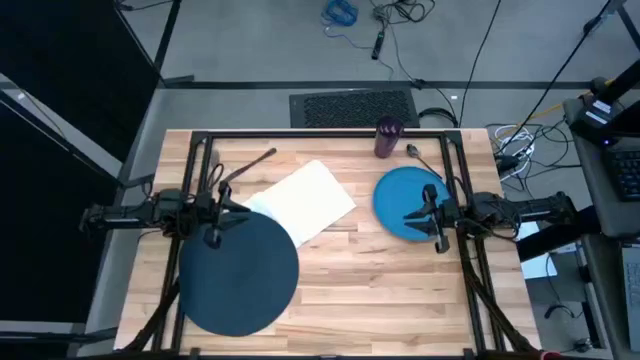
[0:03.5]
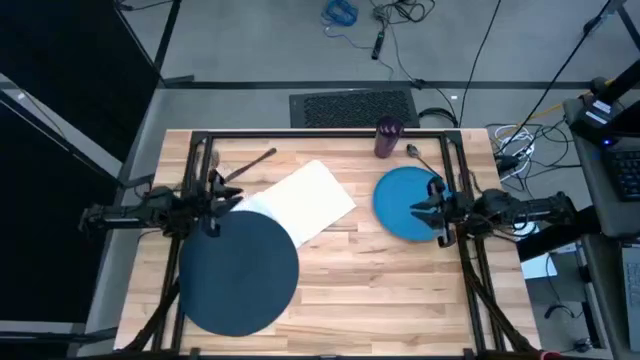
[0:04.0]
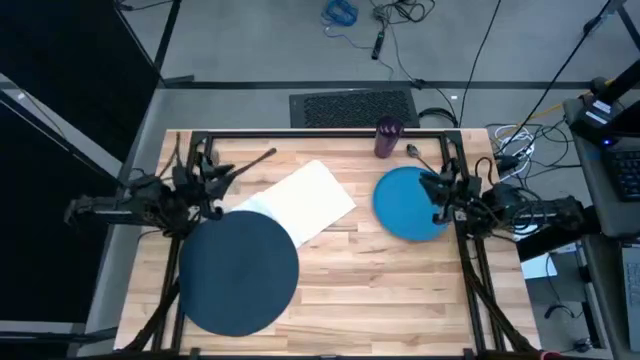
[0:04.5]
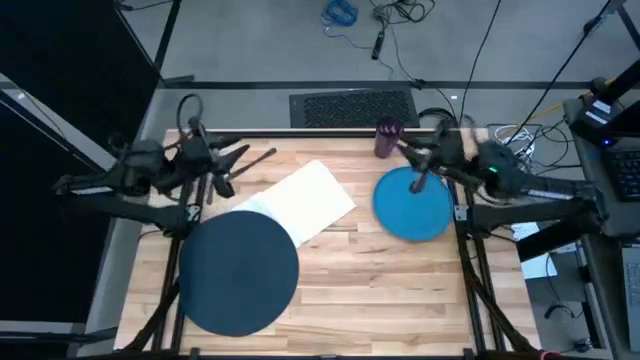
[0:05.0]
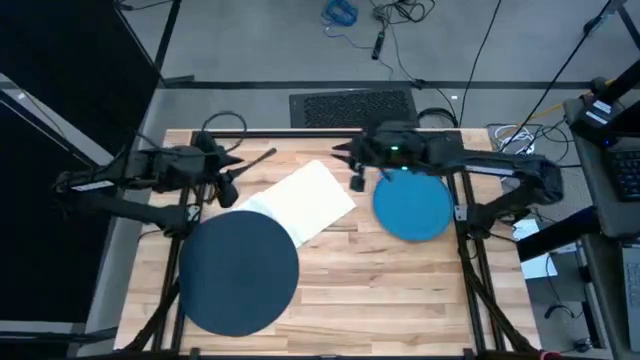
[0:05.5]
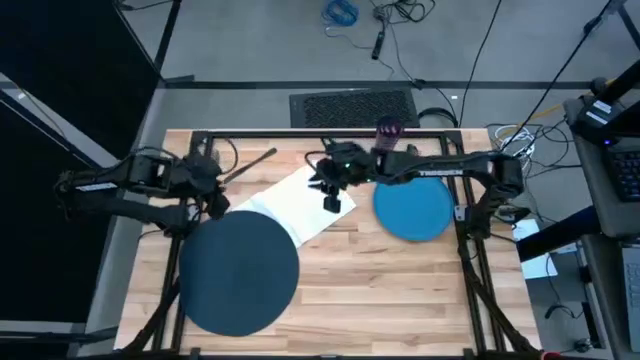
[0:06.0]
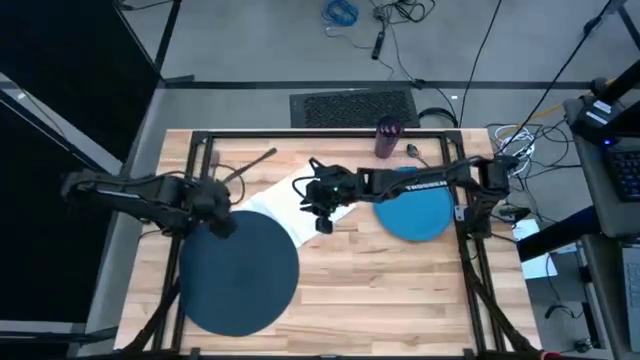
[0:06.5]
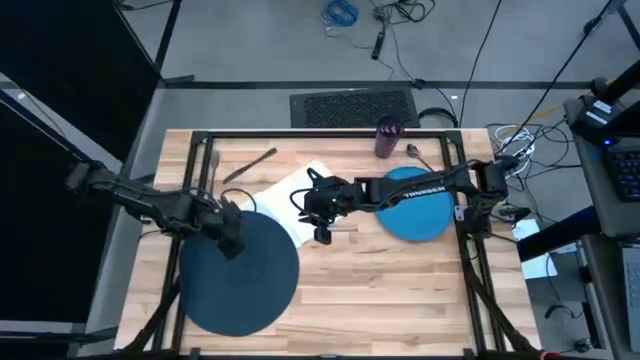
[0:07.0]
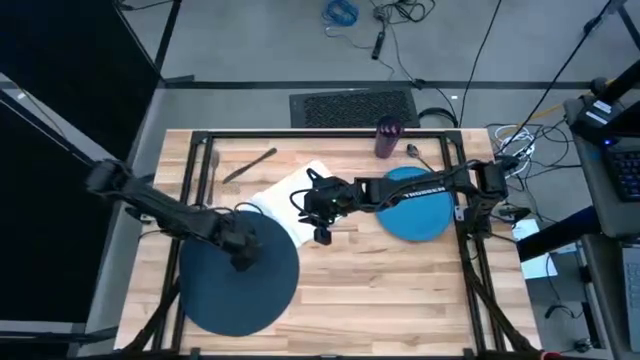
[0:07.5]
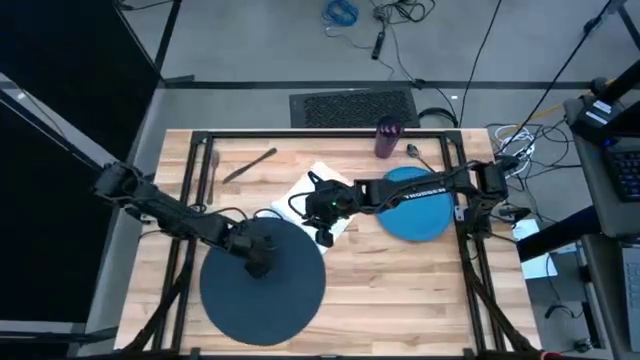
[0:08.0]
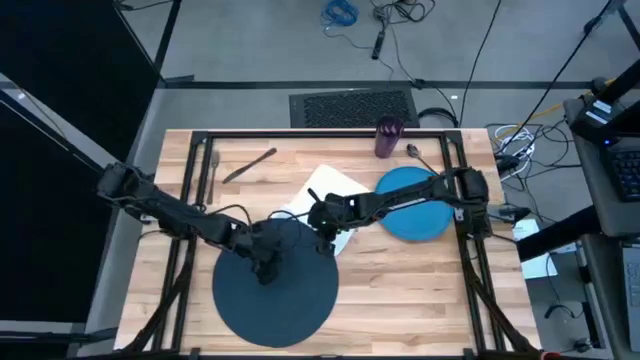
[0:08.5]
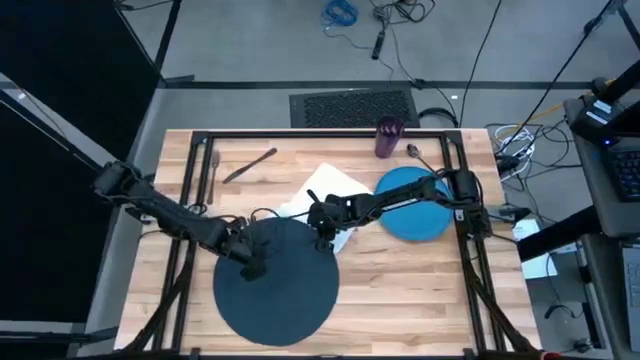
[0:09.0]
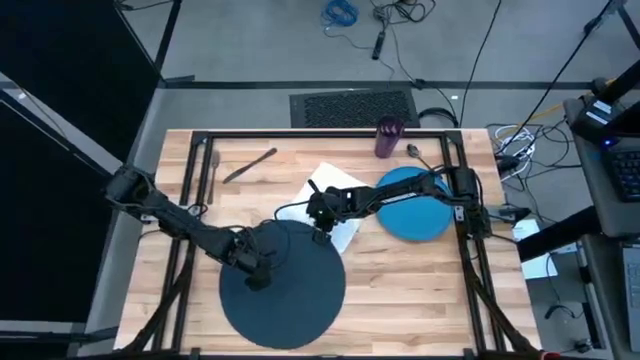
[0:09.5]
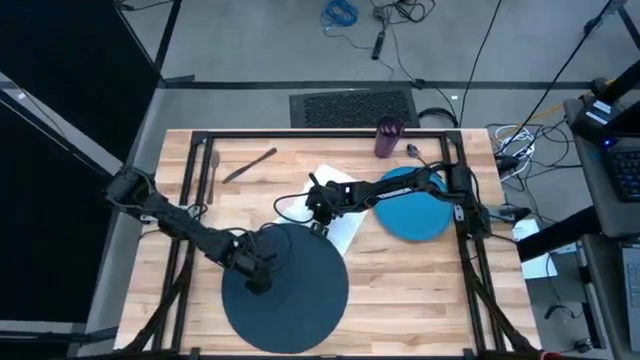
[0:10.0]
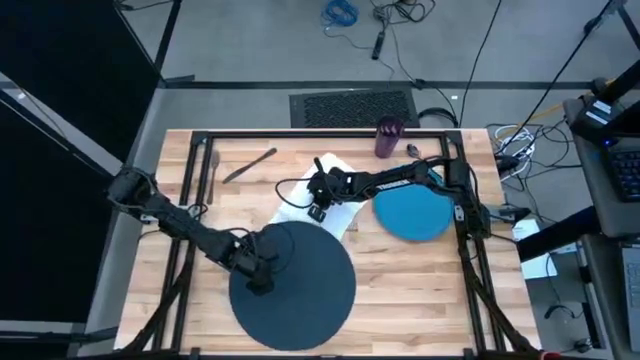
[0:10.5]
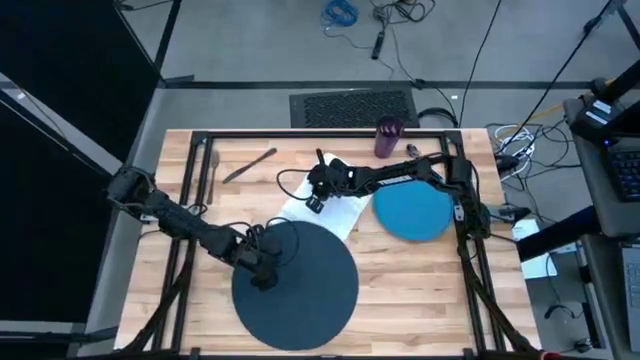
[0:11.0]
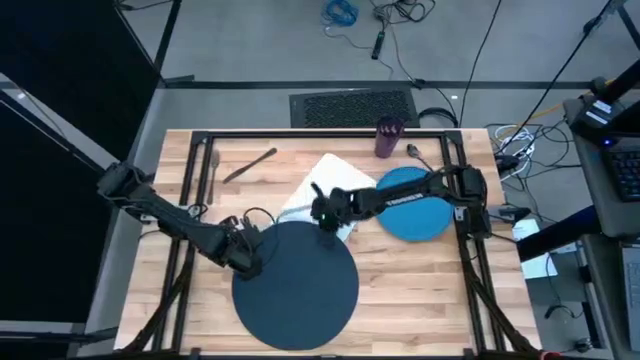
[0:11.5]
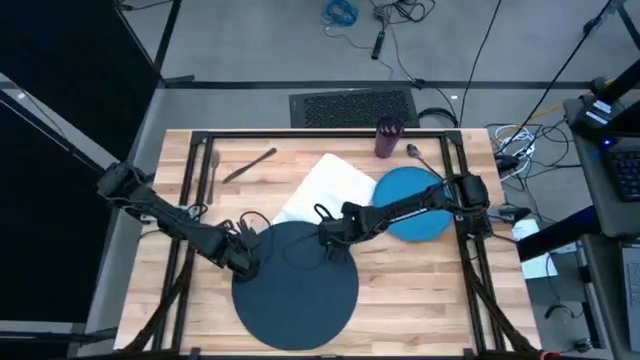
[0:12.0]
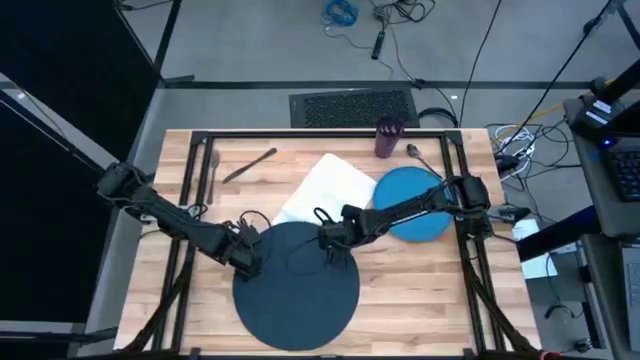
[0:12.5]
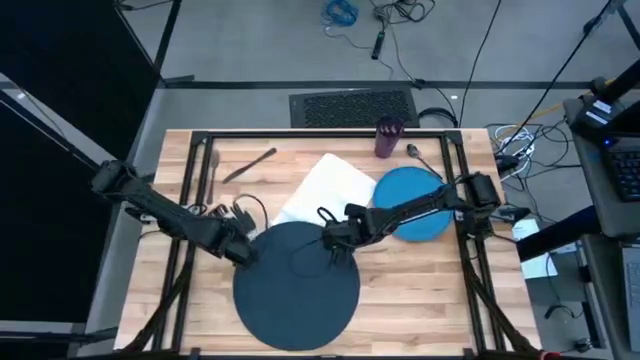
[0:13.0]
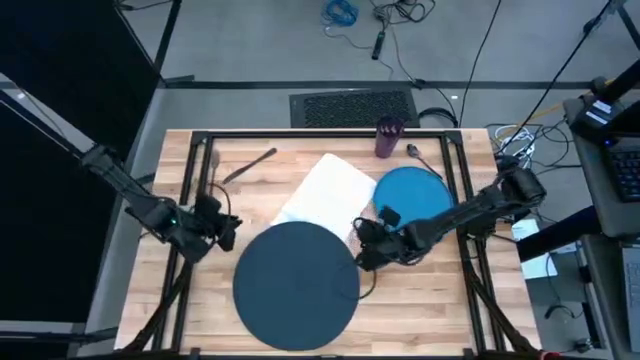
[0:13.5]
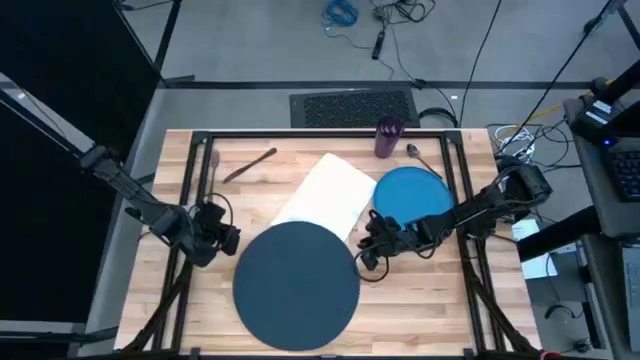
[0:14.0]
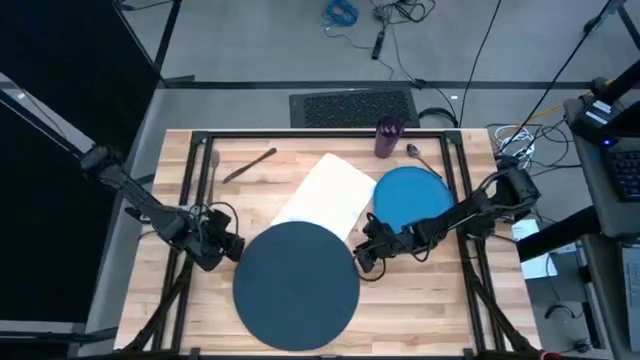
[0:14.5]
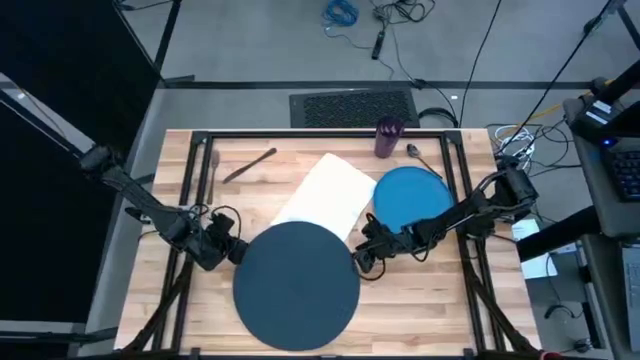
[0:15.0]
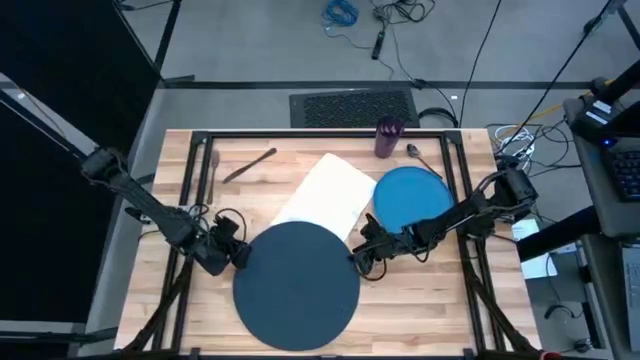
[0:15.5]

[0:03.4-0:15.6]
Task: Set table place
Move the blue table mat to the center of the table

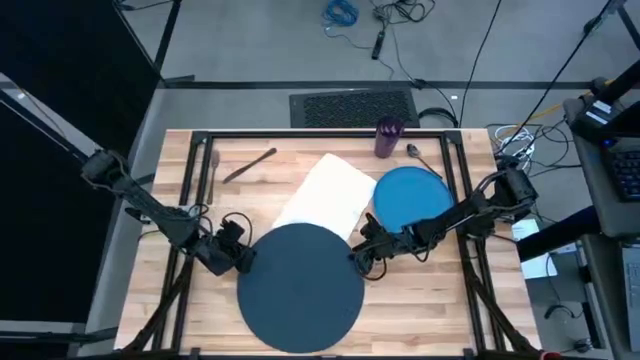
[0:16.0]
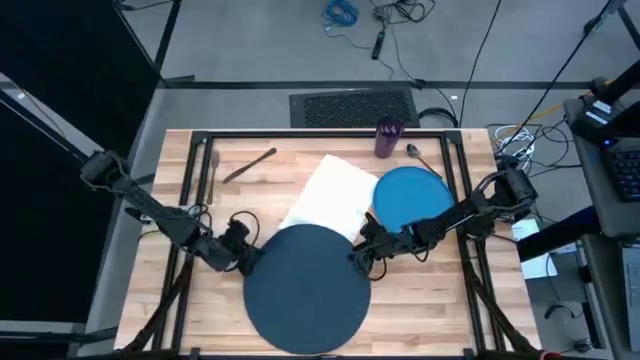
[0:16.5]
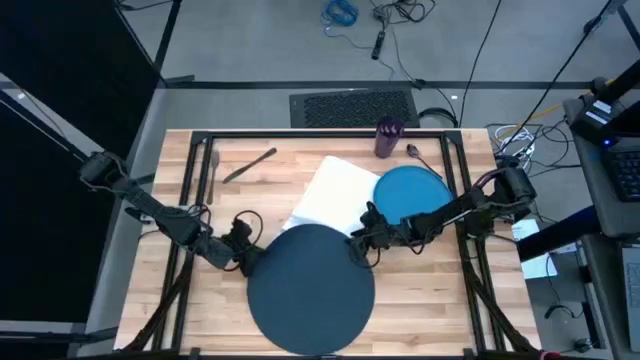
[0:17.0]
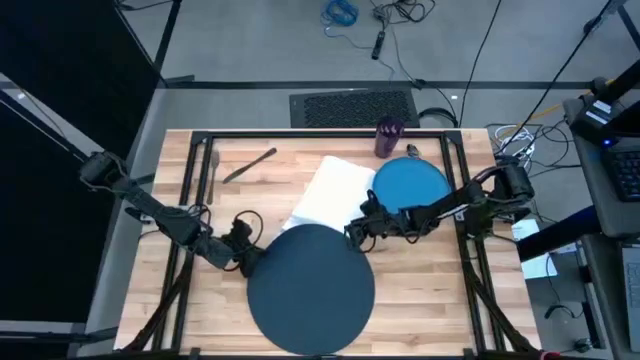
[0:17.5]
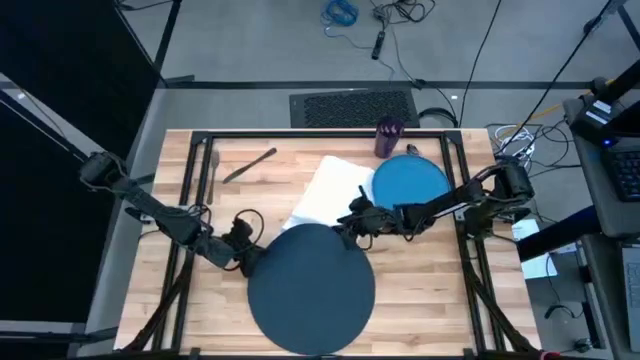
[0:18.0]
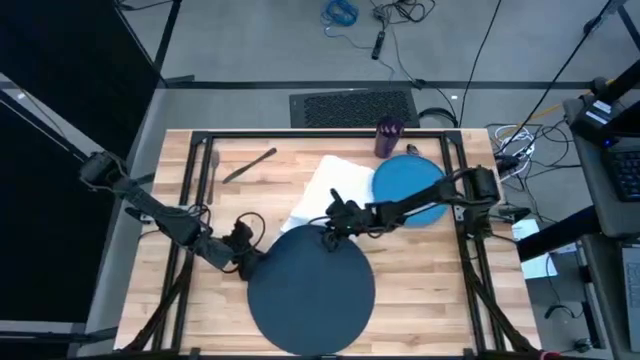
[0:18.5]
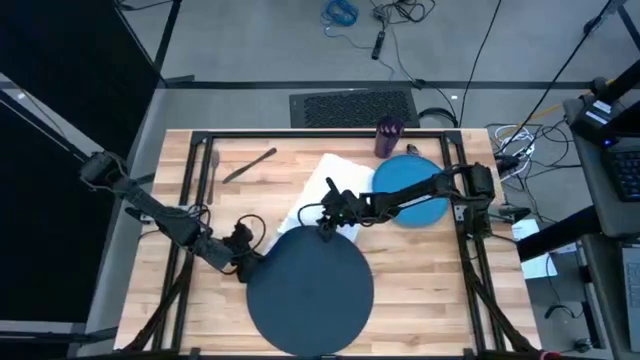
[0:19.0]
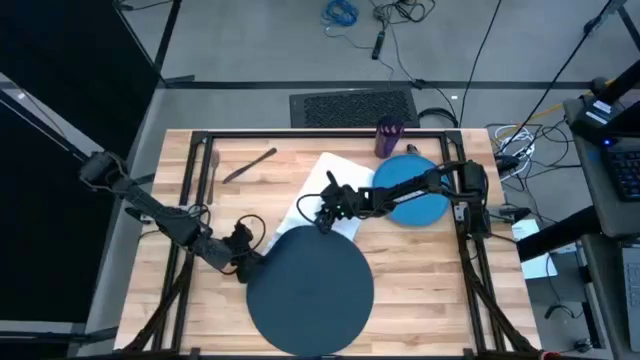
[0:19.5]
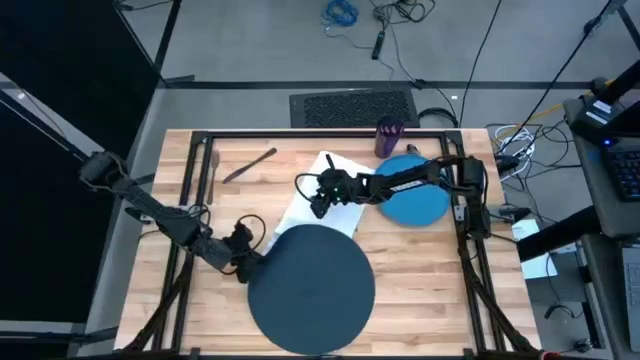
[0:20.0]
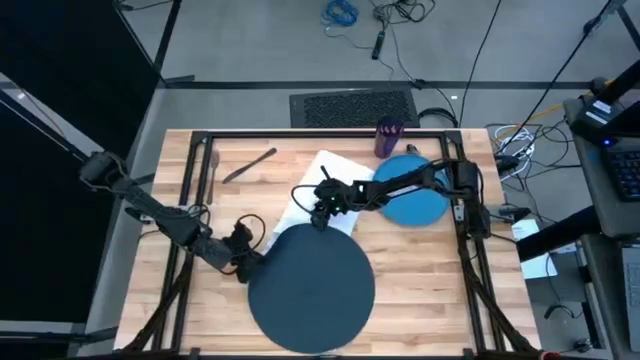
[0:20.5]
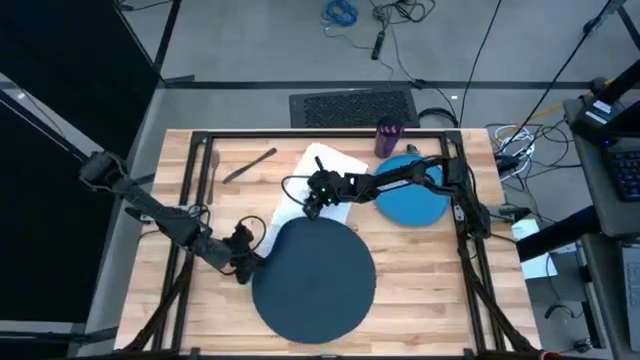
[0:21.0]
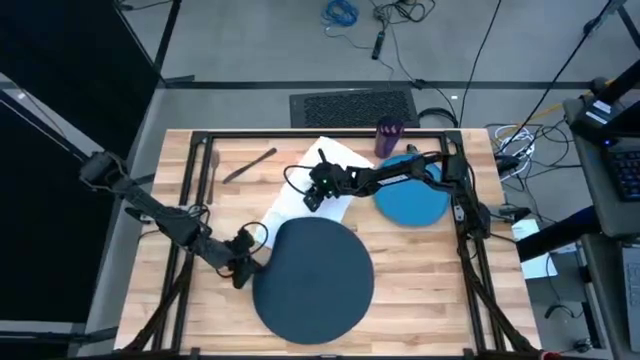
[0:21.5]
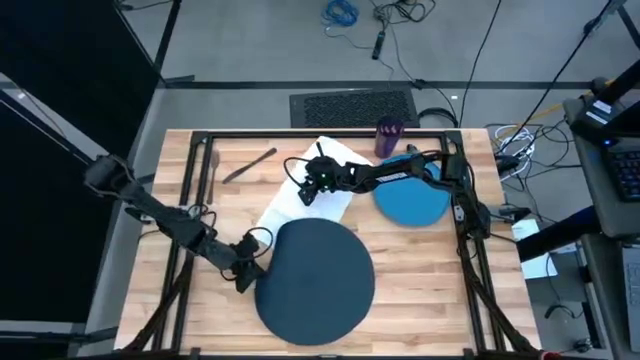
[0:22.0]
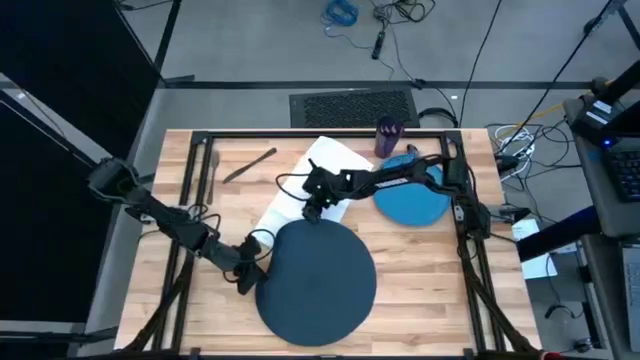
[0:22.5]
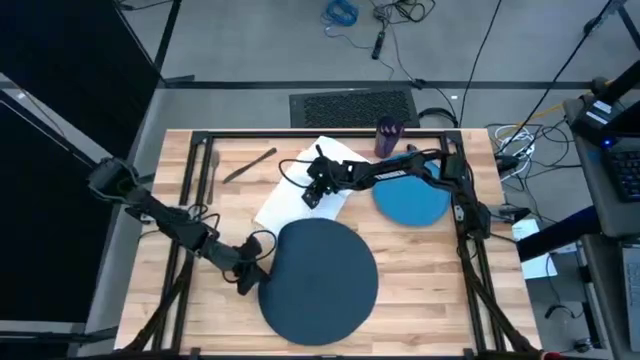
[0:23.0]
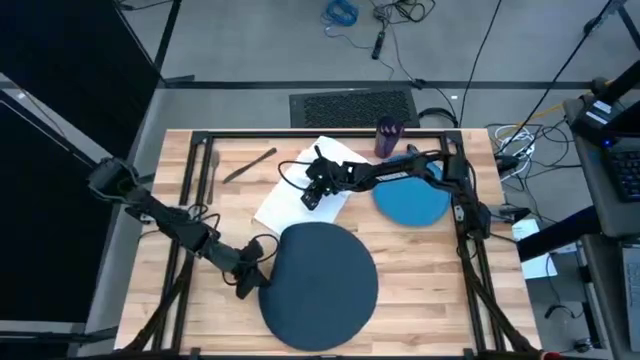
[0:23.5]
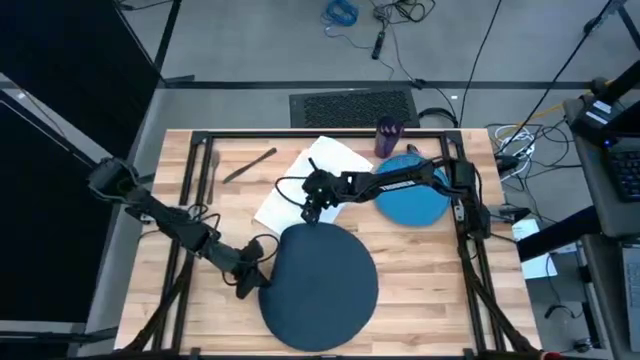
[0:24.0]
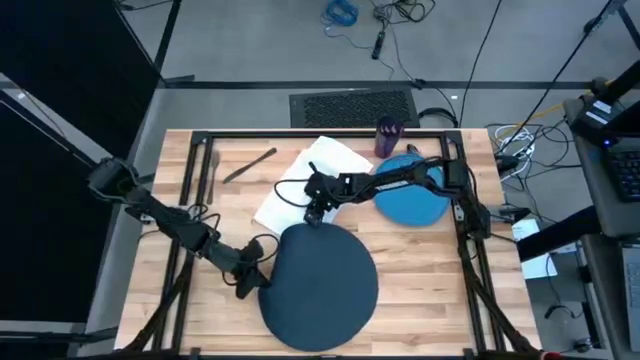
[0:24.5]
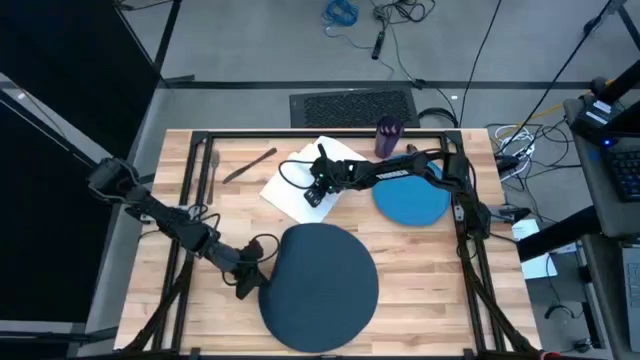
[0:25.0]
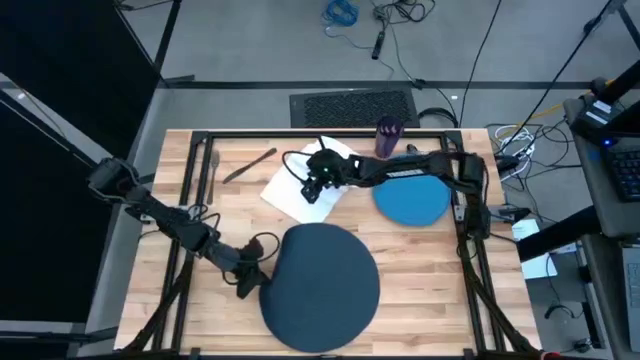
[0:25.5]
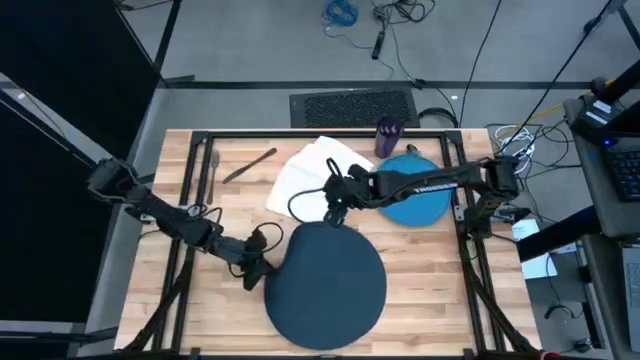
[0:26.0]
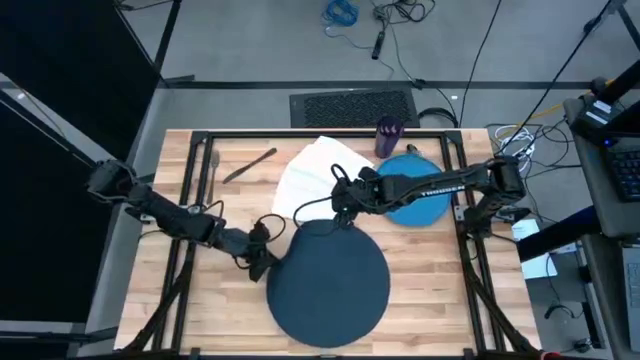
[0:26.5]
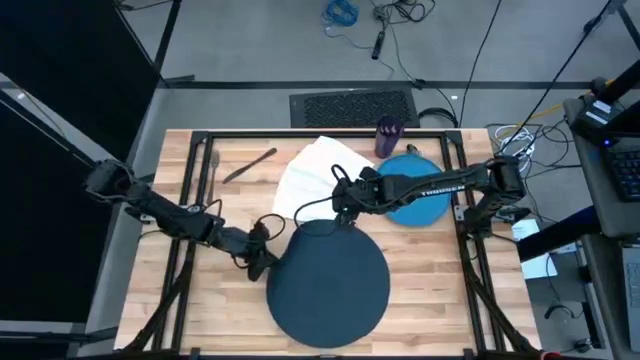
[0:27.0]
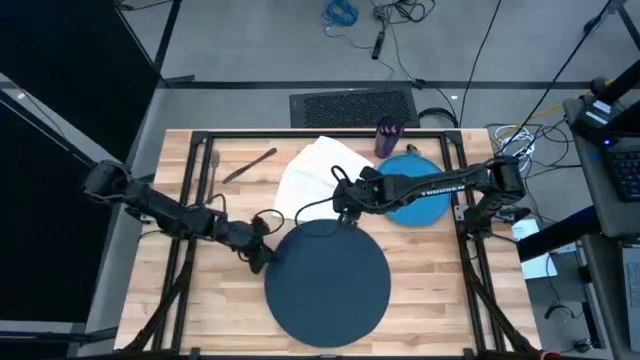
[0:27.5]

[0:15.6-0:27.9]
Move the blue table mat to the center of the table
